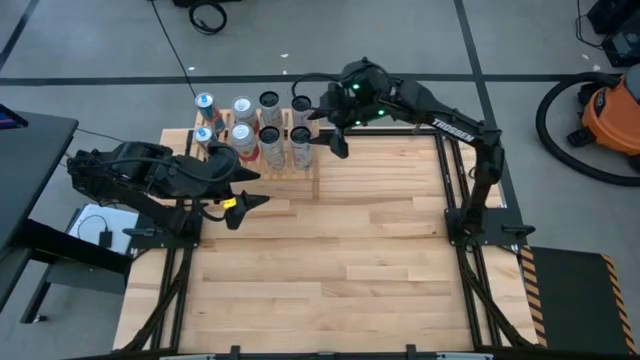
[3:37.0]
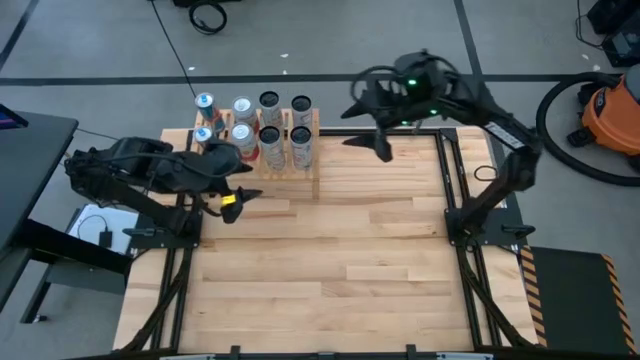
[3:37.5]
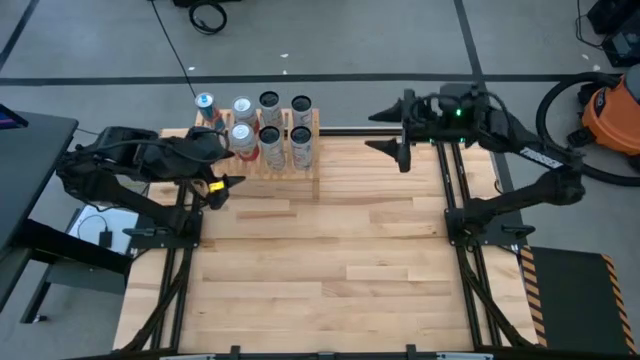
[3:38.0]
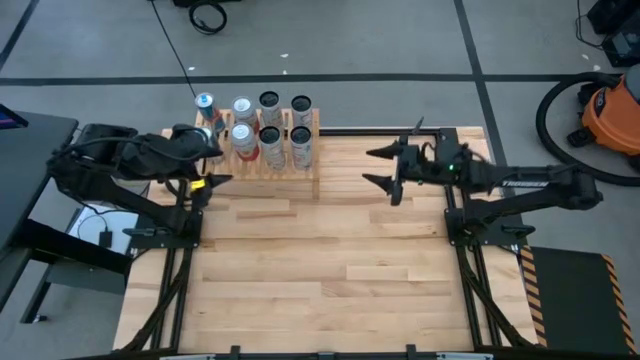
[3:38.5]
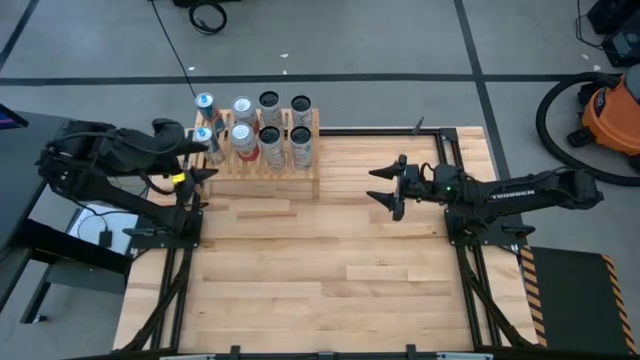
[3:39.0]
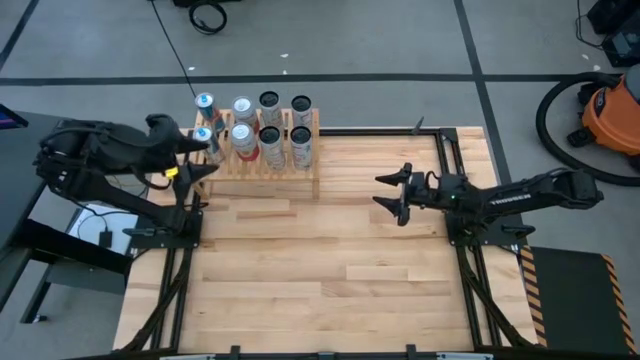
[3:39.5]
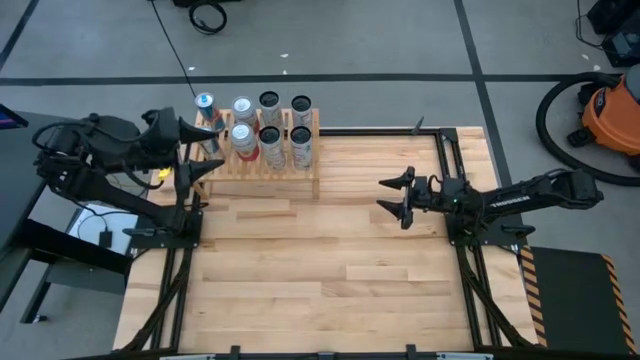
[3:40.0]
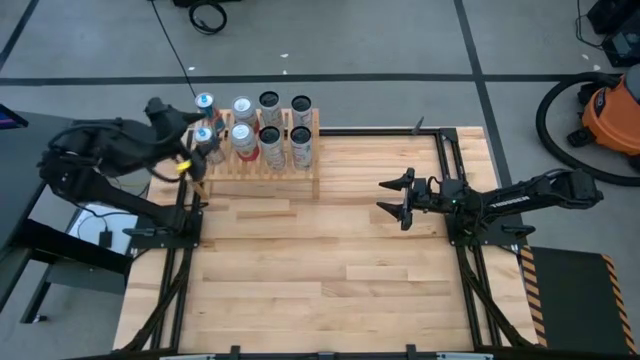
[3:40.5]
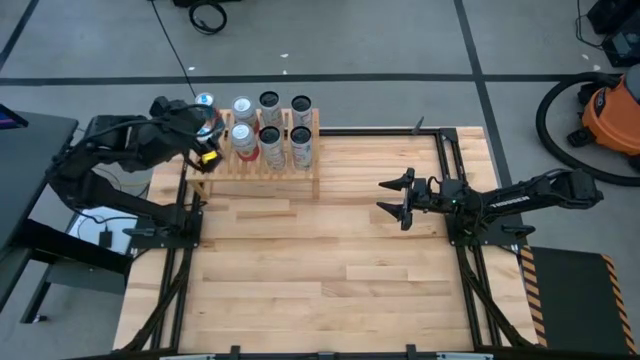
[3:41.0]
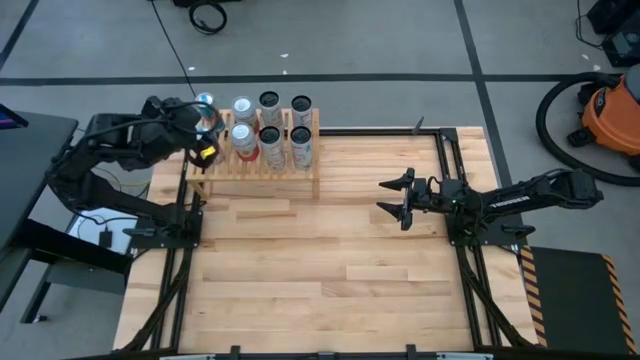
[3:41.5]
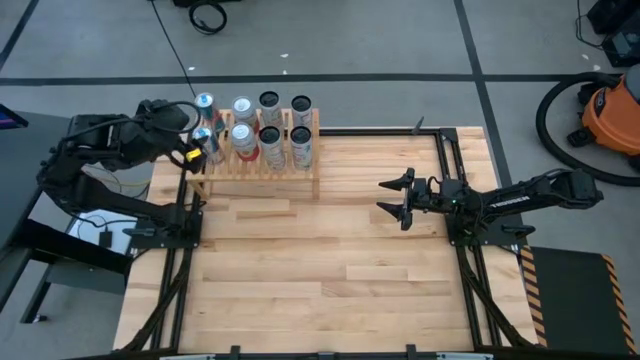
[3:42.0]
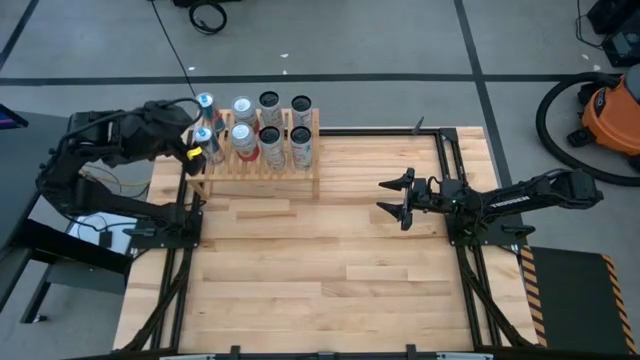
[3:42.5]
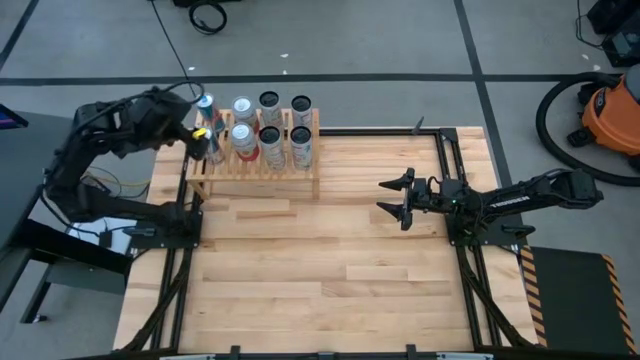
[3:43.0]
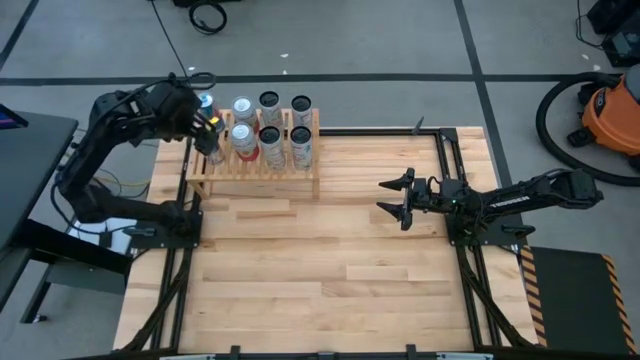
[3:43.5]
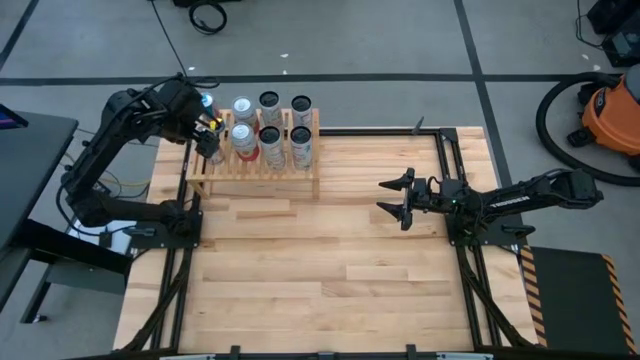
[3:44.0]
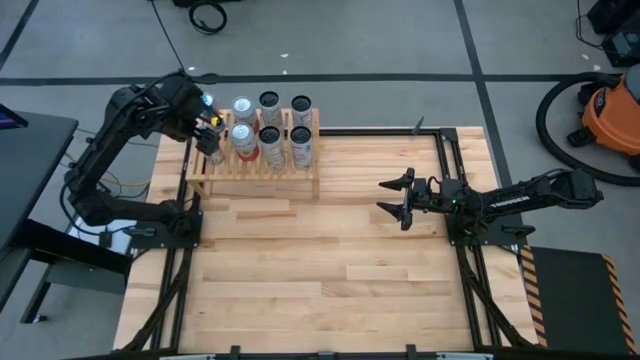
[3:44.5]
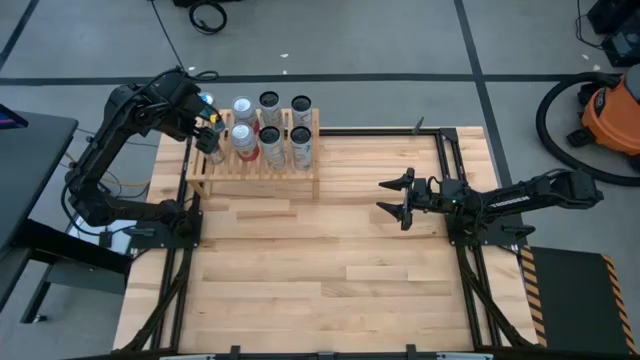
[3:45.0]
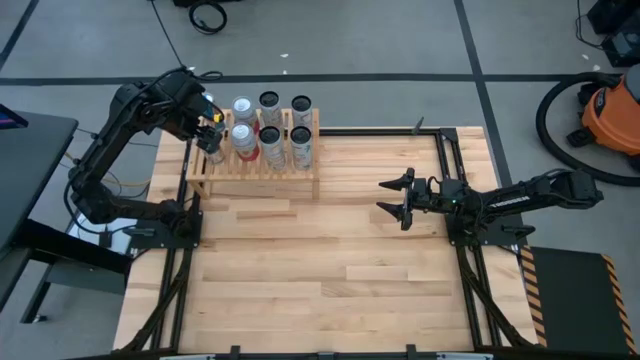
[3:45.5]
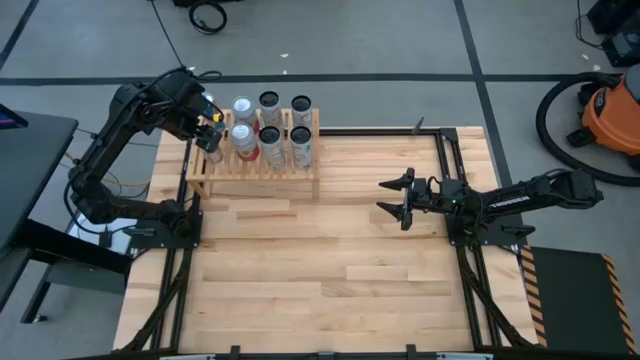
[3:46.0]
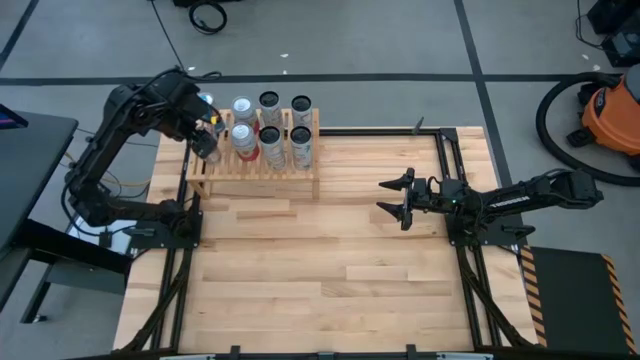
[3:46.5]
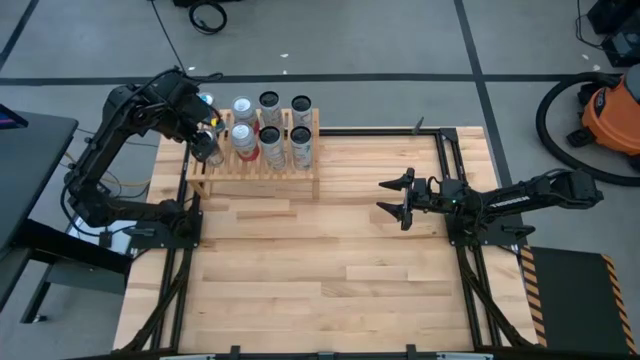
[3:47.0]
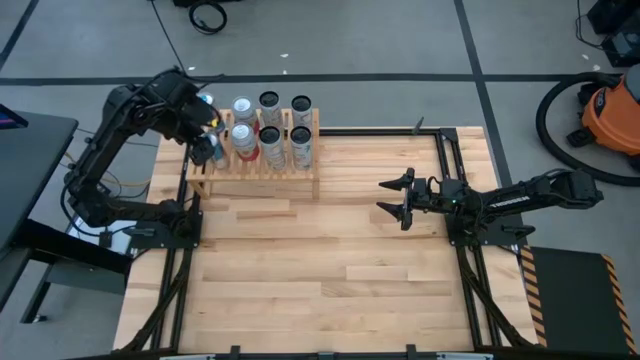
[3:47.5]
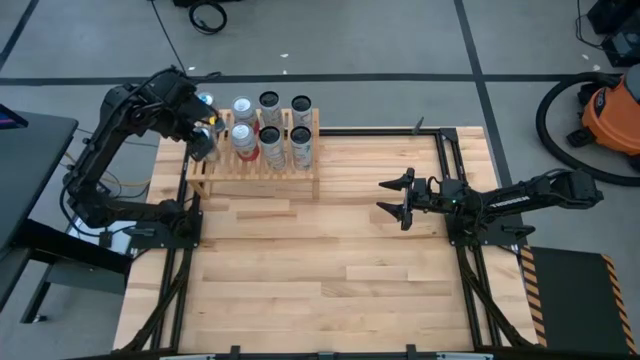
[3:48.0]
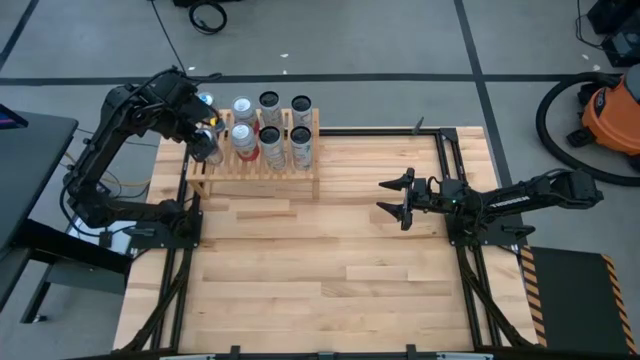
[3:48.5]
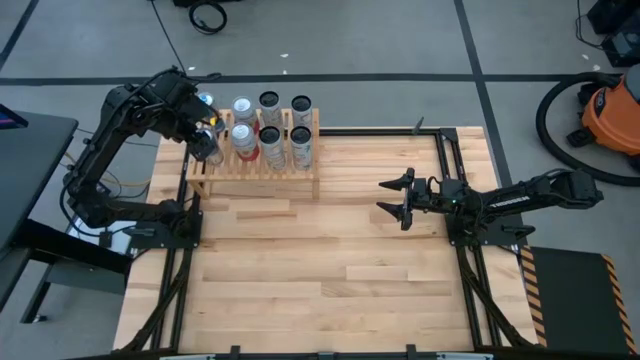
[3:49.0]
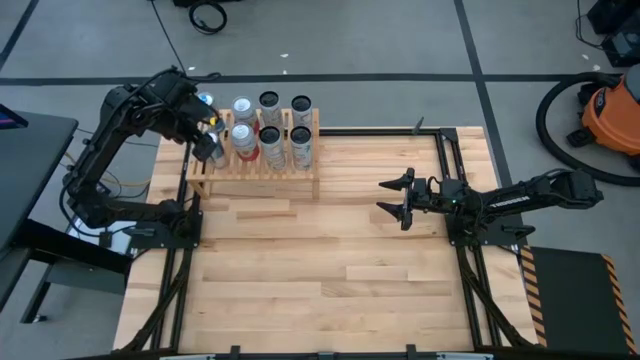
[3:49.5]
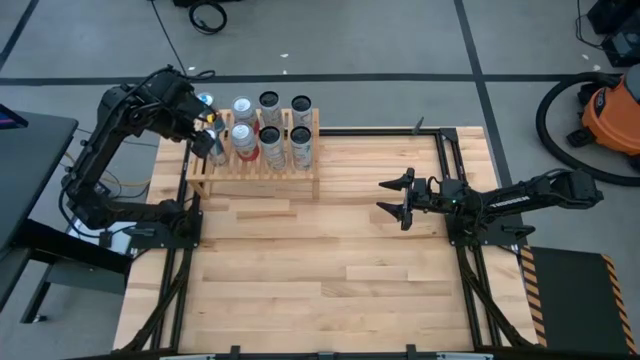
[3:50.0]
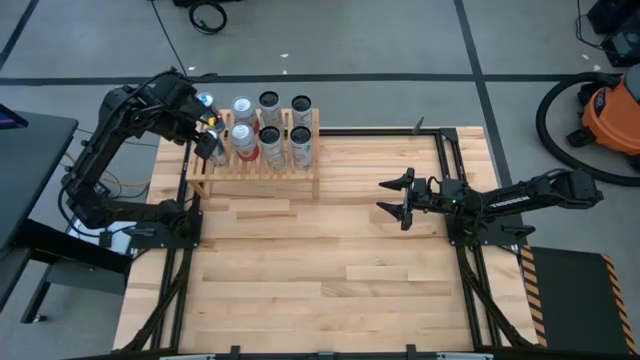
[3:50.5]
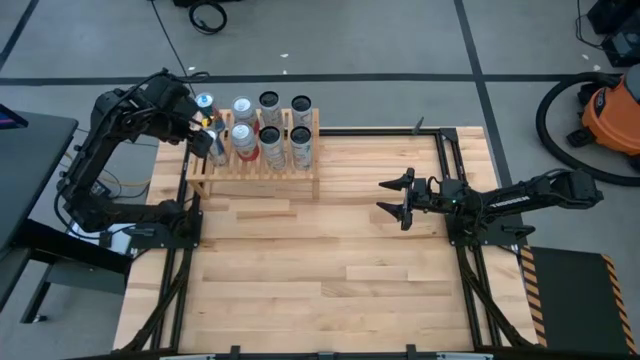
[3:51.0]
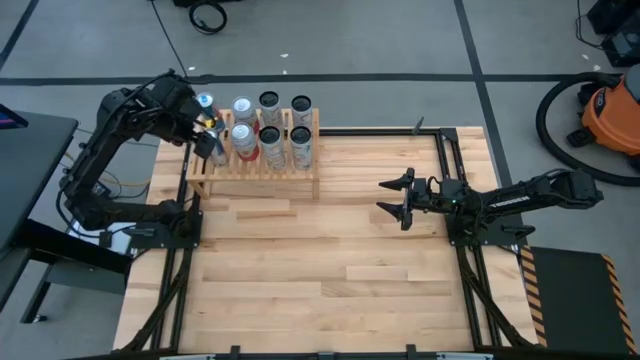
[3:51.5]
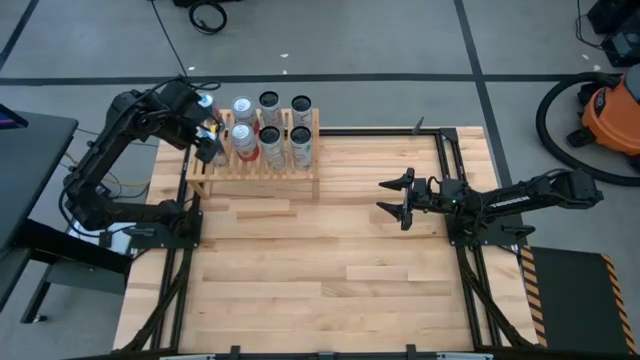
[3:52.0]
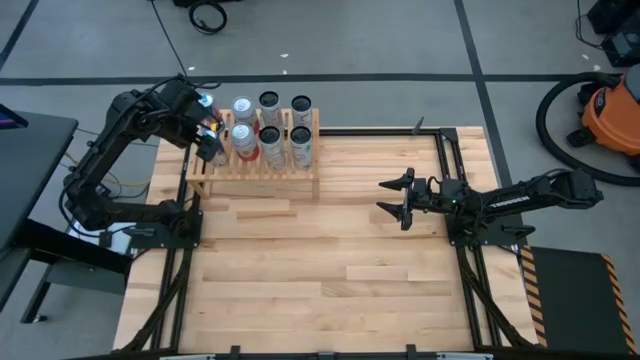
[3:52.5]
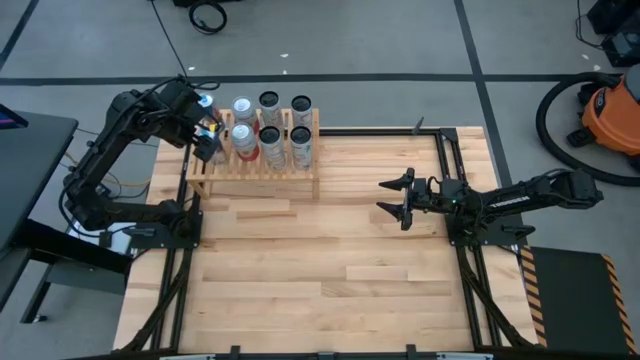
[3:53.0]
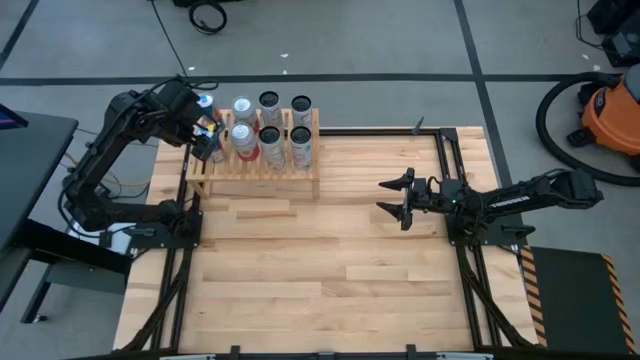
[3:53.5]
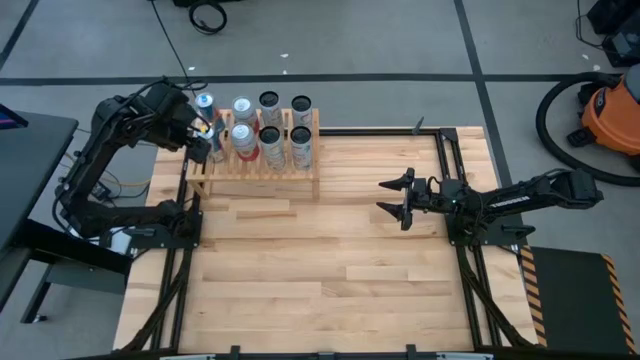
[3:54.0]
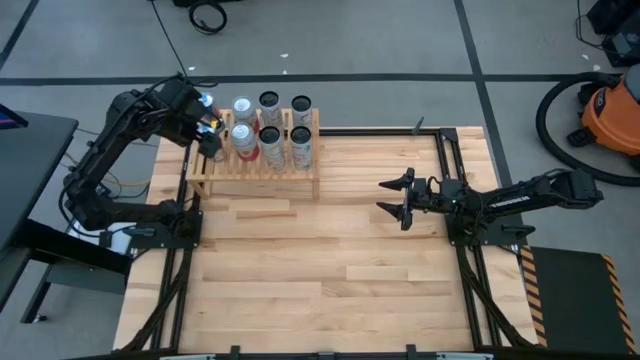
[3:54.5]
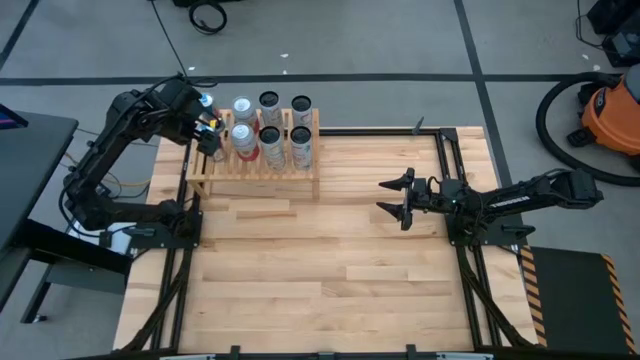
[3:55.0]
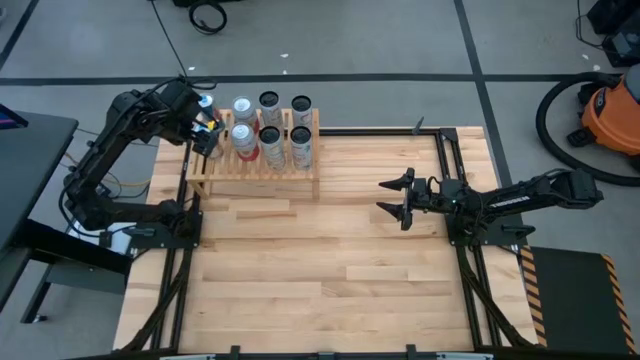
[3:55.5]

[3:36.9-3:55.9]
Task: Place canned beverage on shelf
Adjust the blue soda can

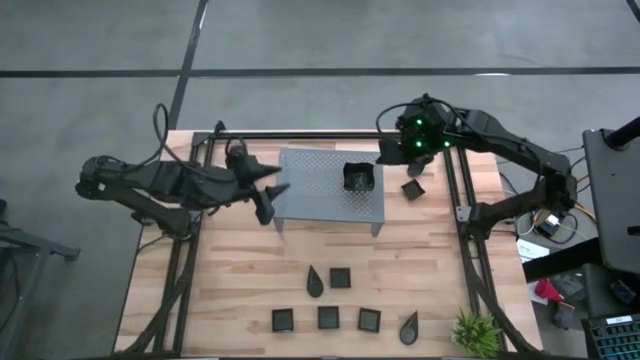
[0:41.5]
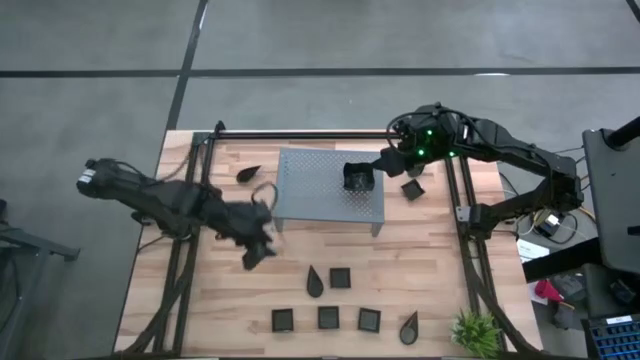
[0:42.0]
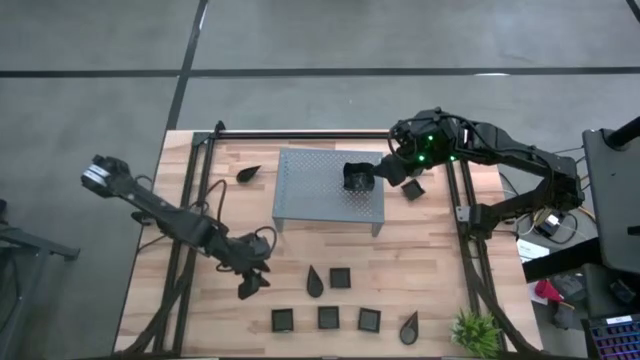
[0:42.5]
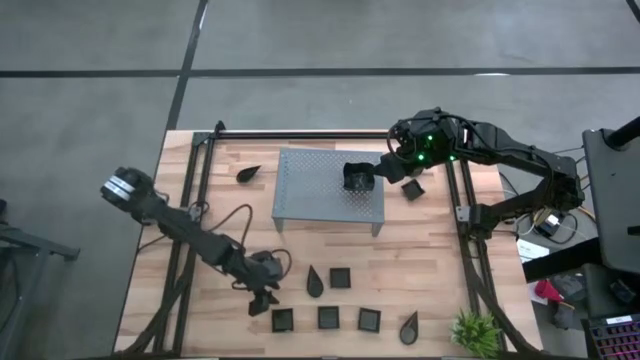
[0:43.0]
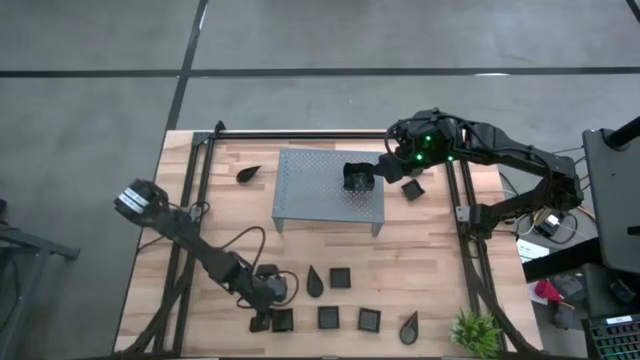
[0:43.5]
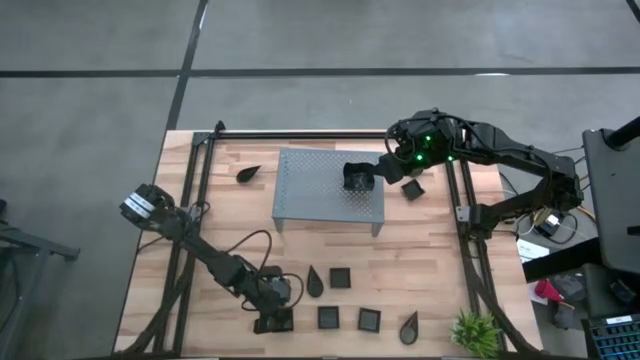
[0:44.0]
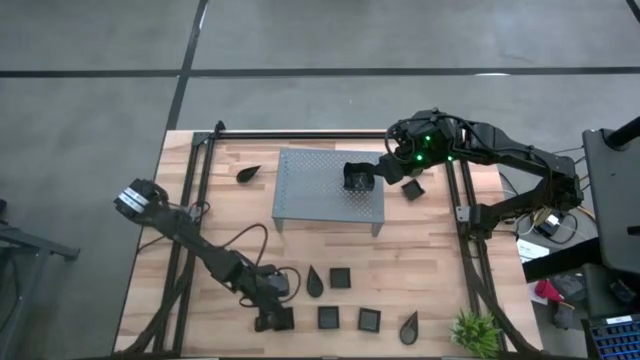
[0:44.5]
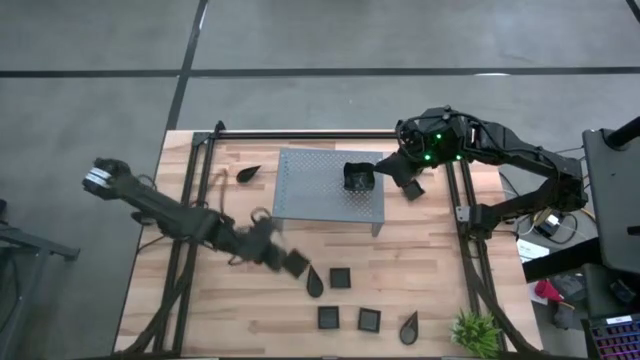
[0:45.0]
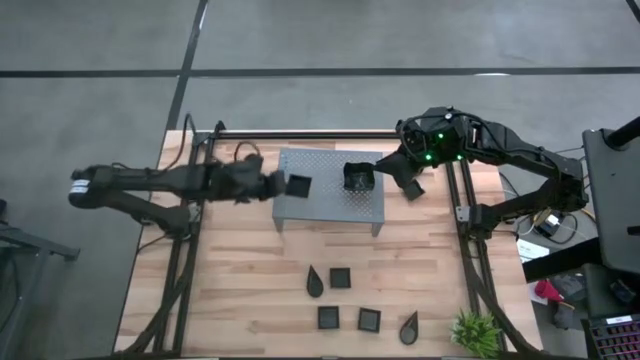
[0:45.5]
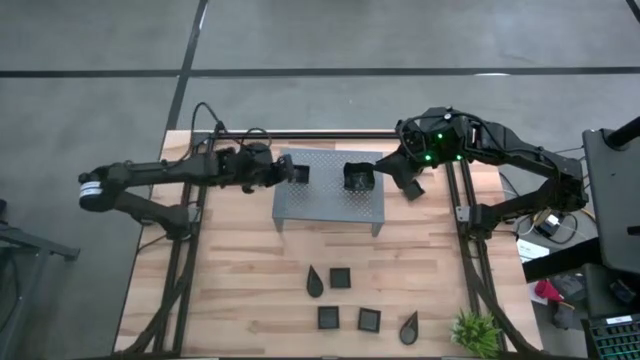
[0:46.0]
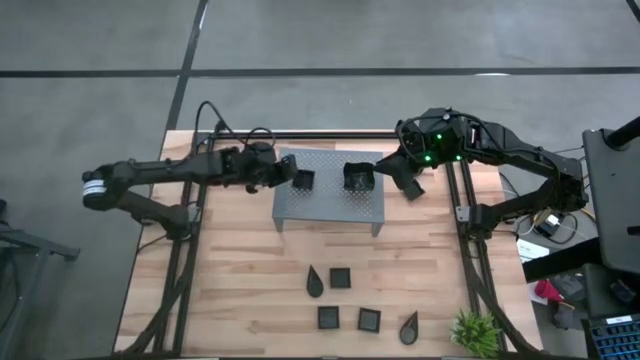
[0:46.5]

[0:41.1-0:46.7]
Task: Pick & Place Mini shaped plates
Put the black square plate on the shelf
